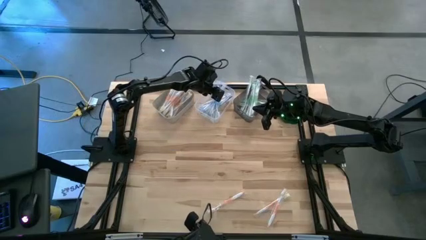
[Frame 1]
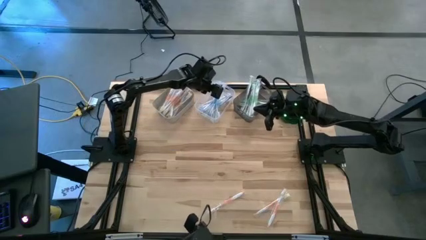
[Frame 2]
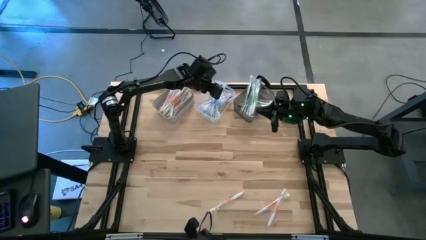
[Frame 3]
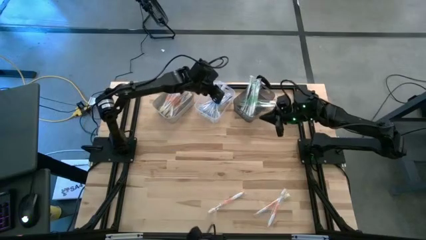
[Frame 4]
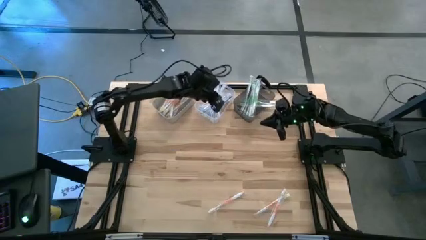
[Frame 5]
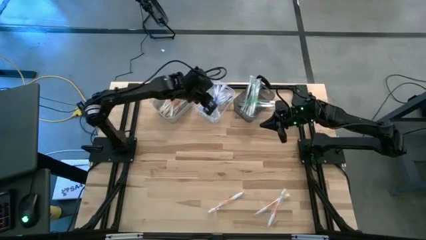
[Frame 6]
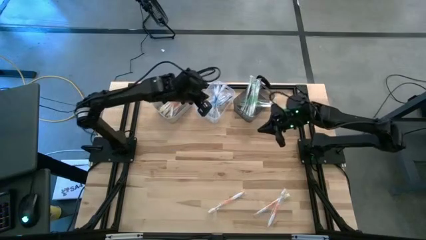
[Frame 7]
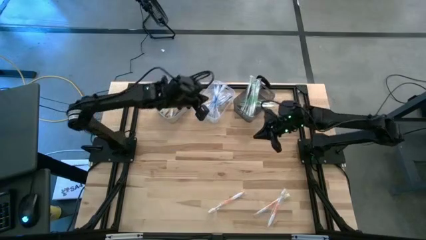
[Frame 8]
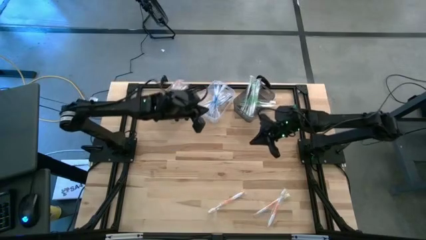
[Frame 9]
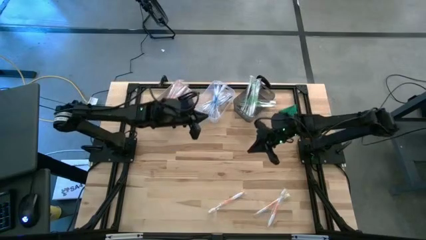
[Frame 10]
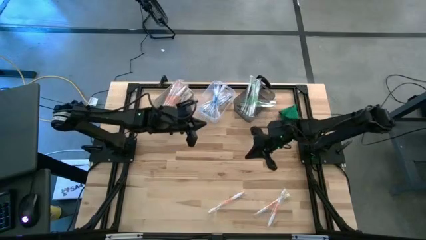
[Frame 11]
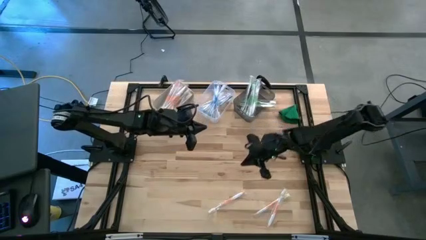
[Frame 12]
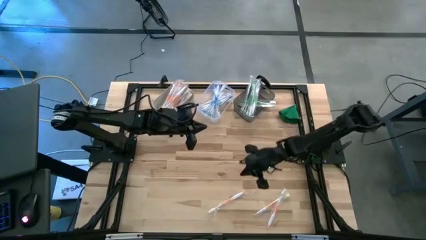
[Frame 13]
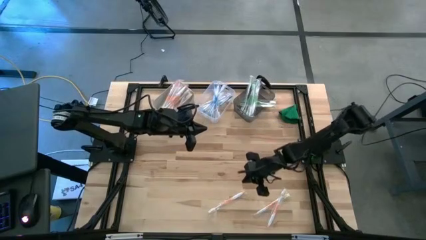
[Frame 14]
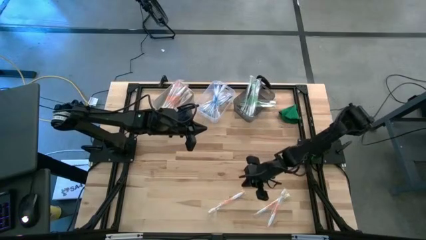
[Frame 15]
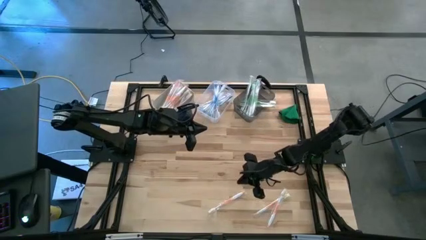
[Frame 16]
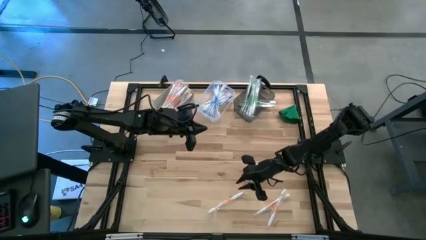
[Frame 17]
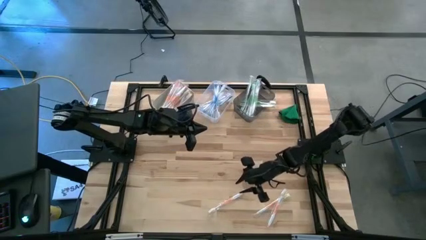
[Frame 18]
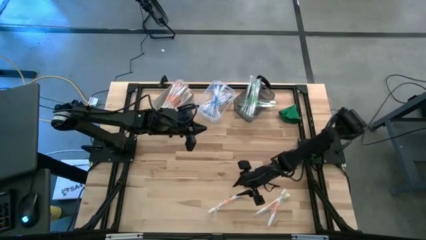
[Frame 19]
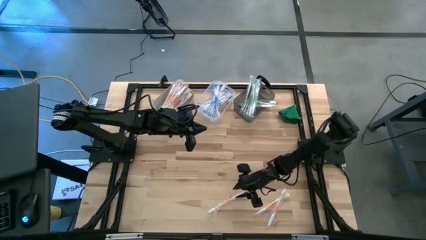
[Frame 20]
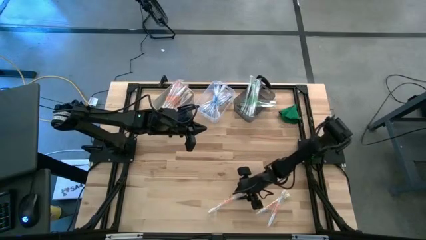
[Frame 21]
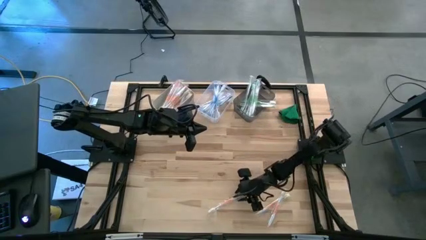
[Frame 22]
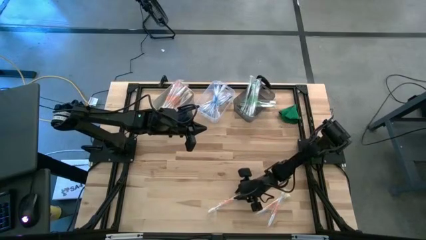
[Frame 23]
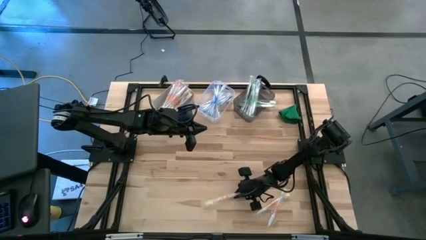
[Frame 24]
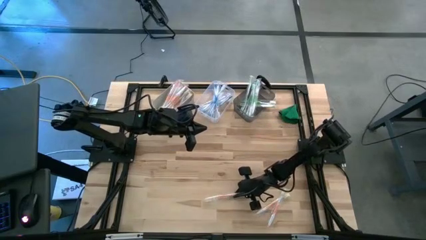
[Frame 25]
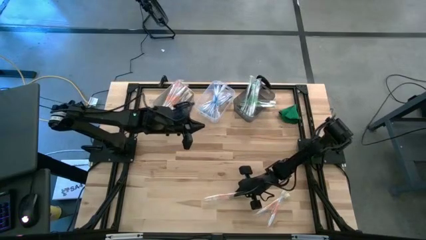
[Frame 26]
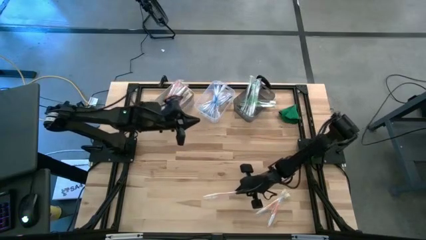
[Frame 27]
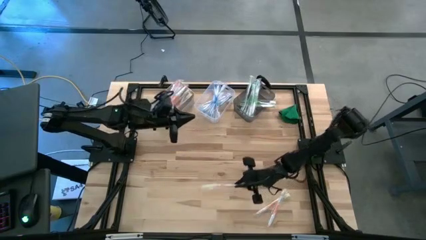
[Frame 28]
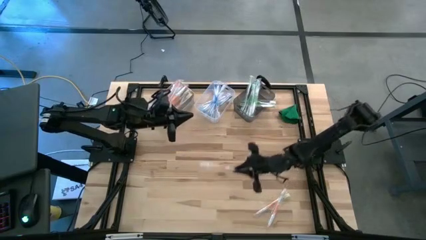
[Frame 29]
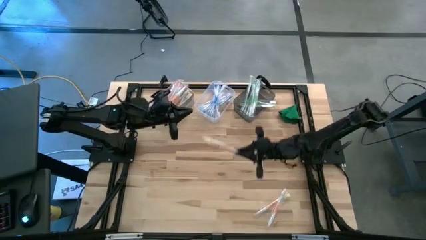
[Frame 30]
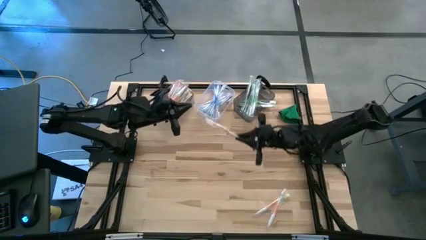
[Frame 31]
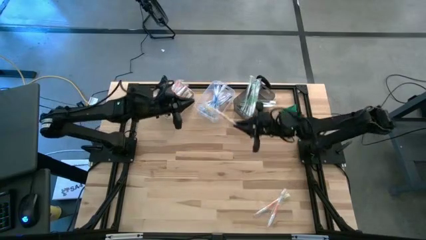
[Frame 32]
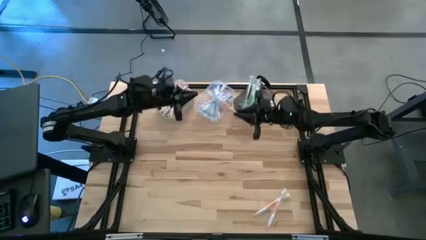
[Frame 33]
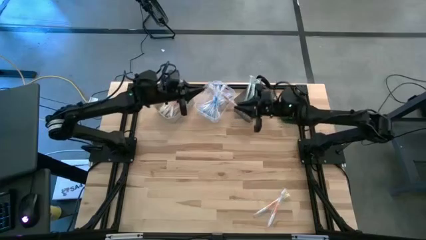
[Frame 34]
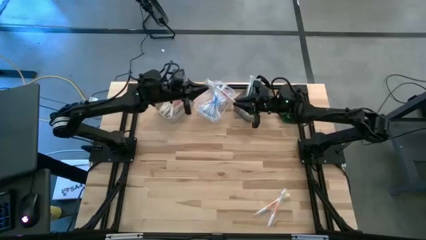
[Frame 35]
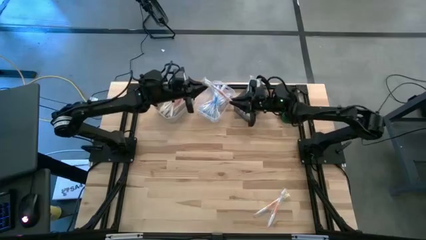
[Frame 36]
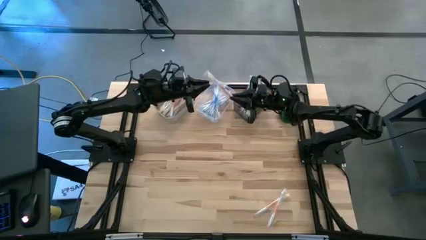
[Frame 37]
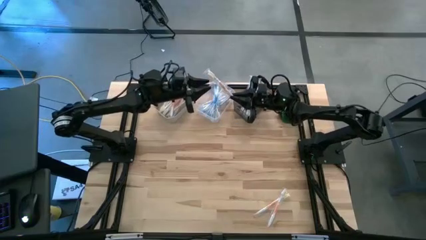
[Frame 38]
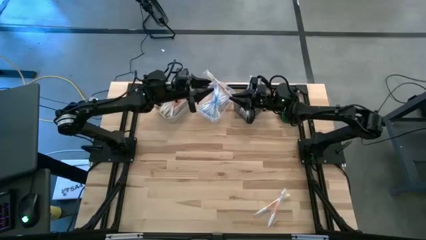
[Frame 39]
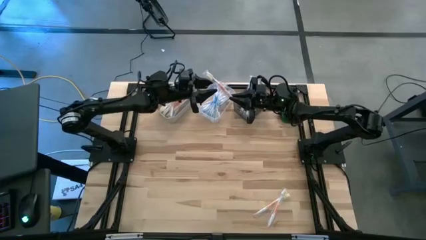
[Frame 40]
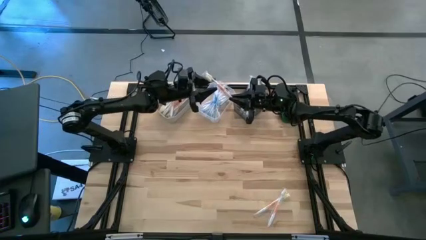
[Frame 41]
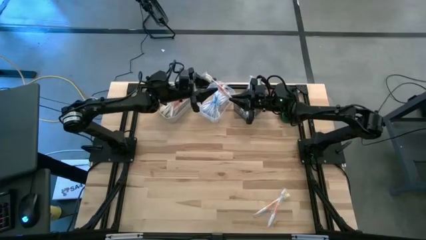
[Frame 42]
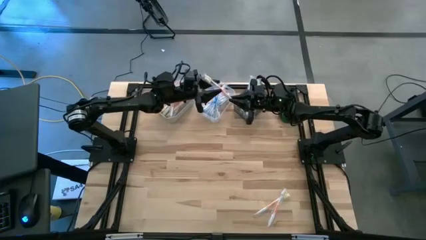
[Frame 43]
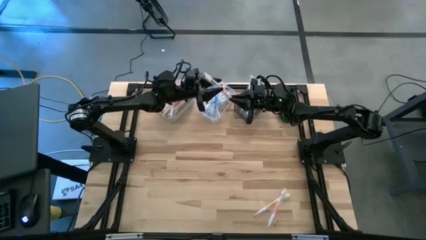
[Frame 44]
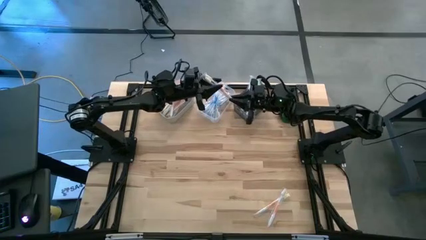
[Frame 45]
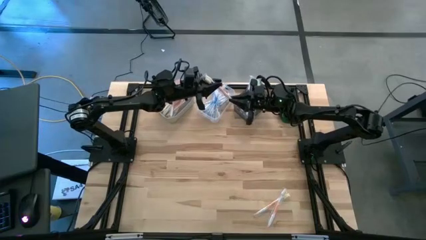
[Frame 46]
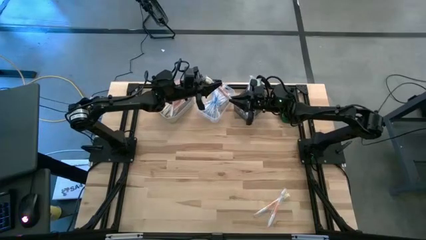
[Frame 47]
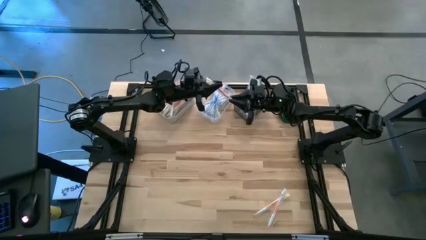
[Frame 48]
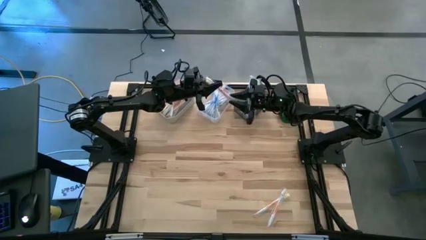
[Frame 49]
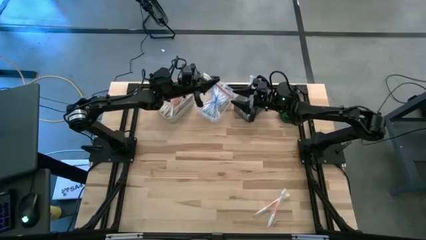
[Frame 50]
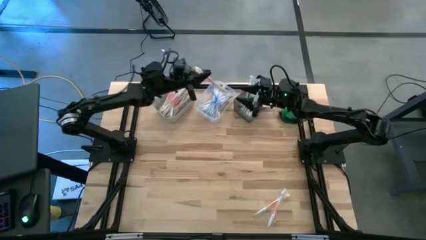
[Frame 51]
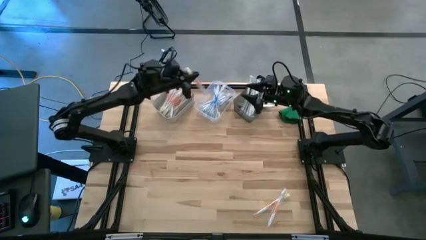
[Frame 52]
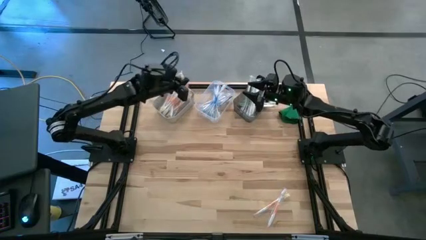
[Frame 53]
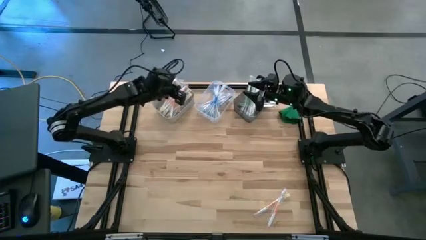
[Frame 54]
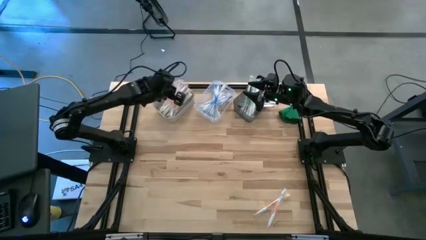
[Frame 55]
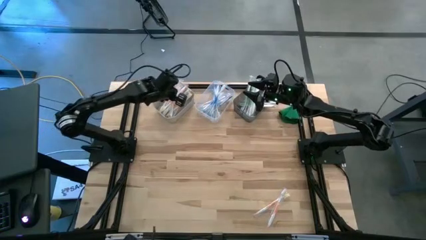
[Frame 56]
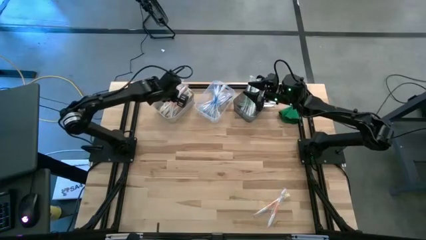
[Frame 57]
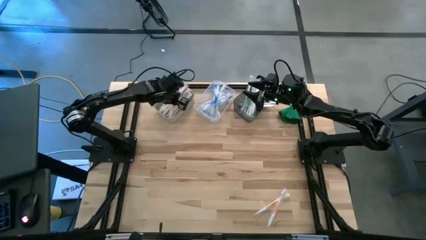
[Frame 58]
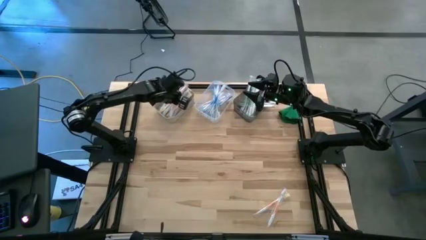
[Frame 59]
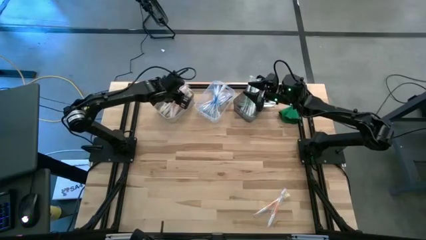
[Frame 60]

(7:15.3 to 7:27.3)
Task: Pick & Place Toothbrushes
Put the orange toothbrush into the white bin

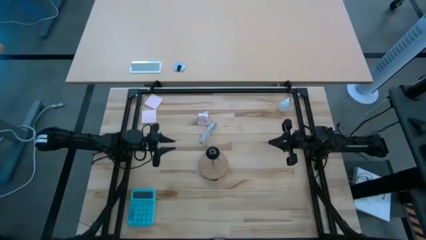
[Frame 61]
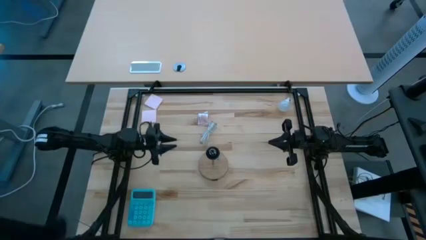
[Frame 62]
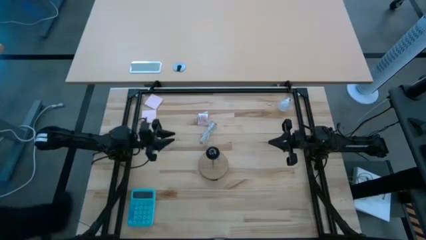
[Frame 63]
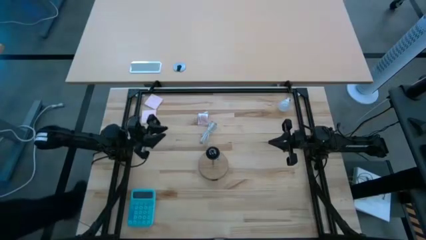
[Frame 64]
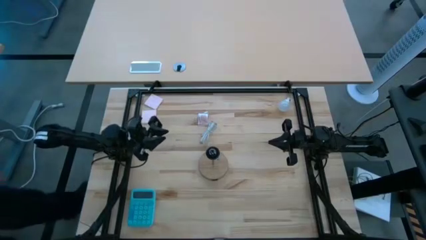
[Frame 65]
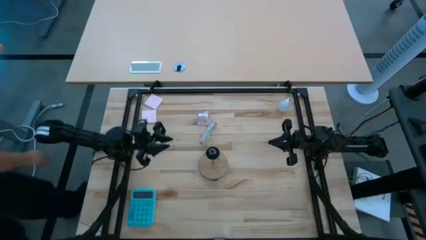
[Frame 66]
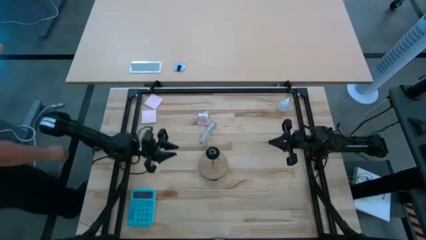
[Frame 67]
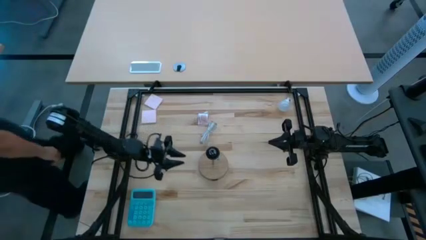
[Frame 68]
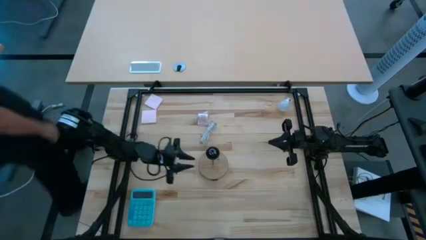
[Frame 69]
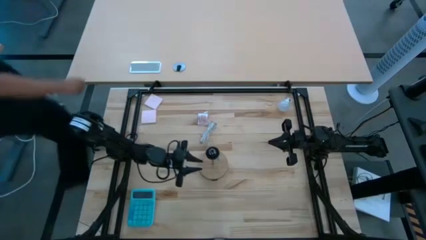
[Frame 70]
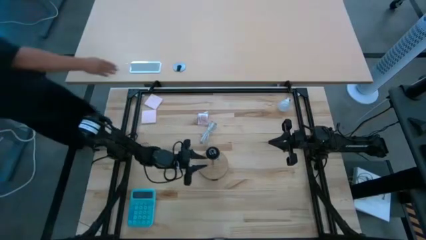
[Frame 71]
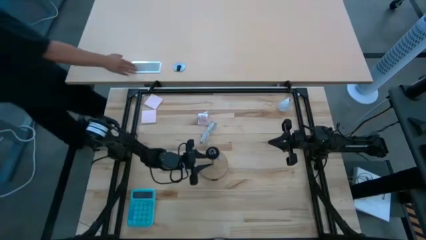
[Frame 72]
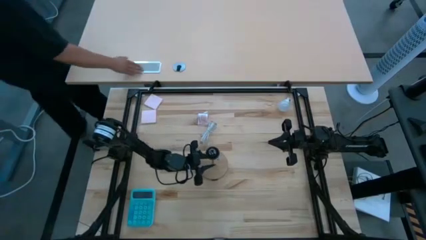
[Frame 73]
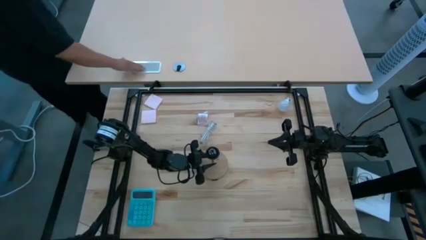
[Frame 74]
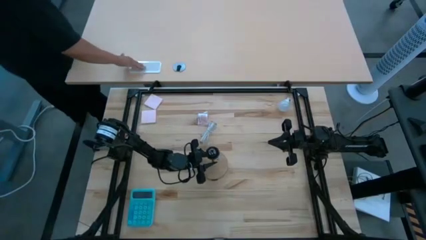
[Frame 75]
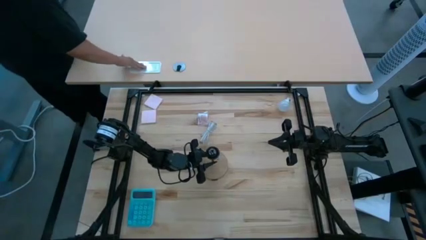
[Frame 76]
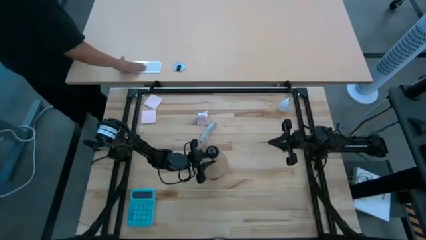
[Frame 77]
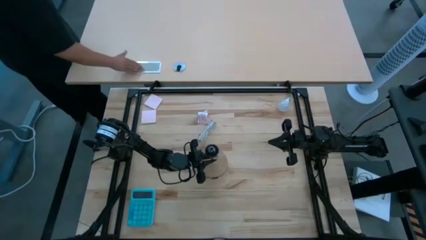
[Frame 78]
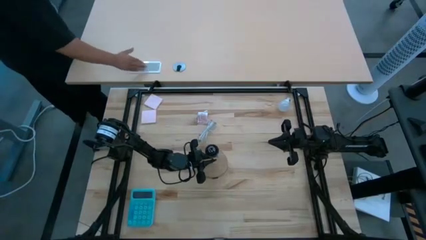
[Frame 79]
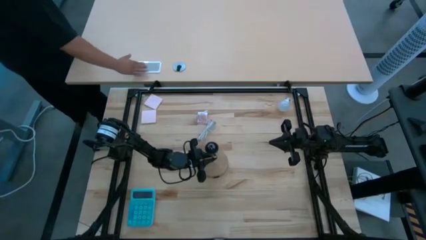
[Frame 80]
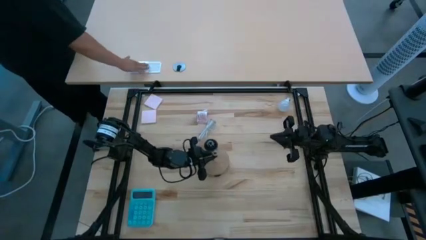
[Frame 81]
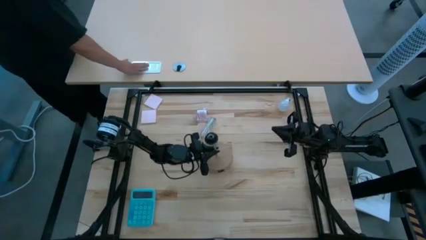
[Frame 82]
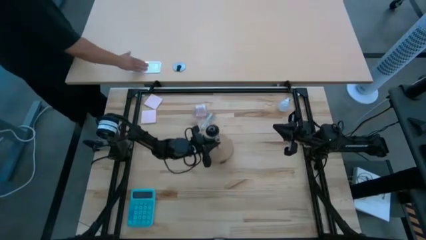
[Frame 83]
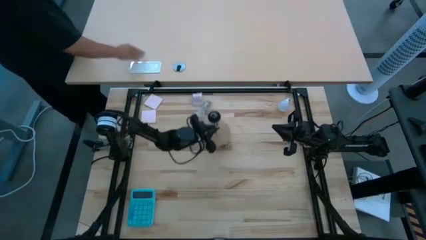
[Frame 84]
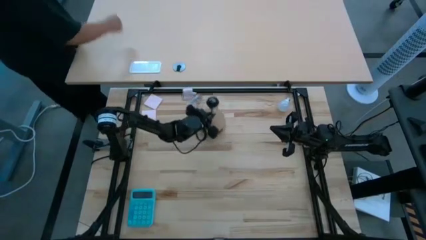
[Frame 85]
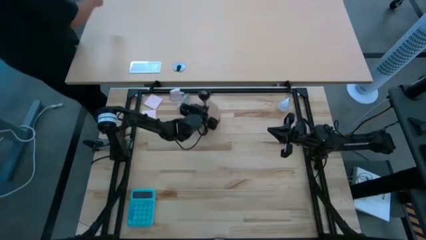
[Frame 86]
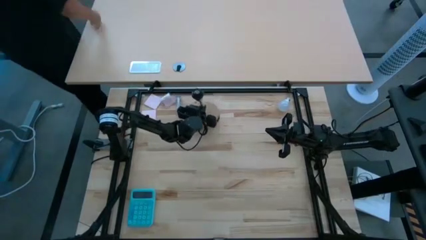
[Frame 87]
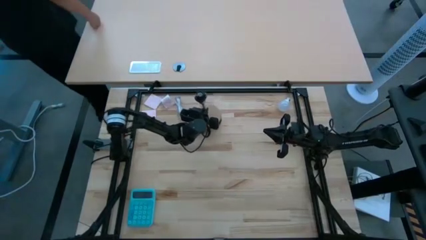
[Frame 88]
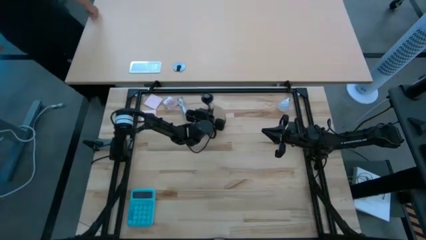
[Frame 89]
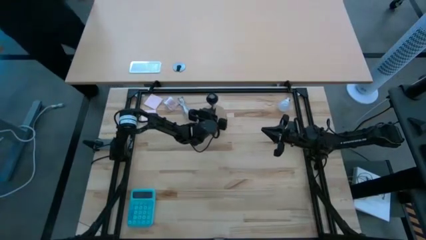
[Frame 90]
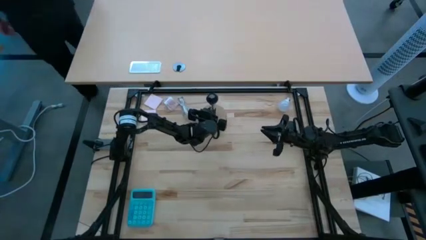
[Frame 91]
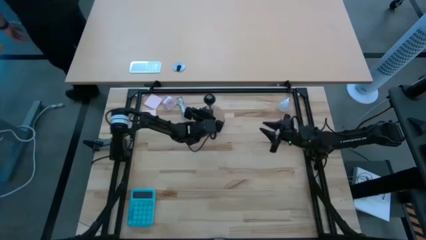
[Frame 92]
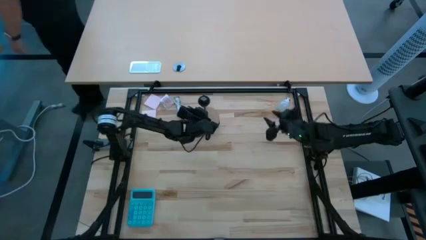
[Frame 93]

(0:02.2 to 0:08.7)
Task: Screw lightbulb
Prepare the lamp
